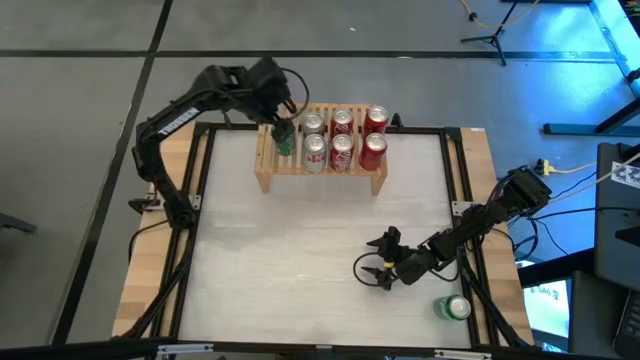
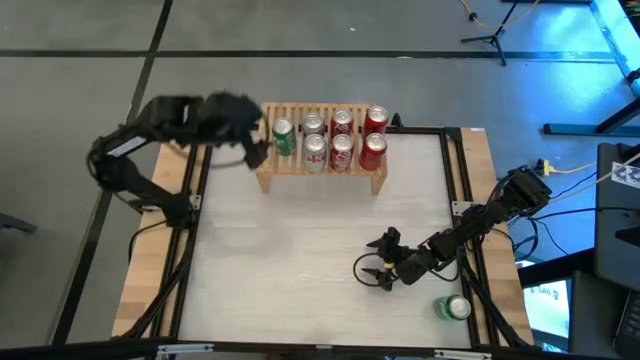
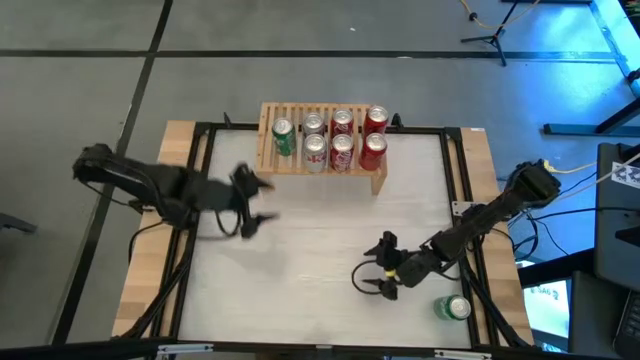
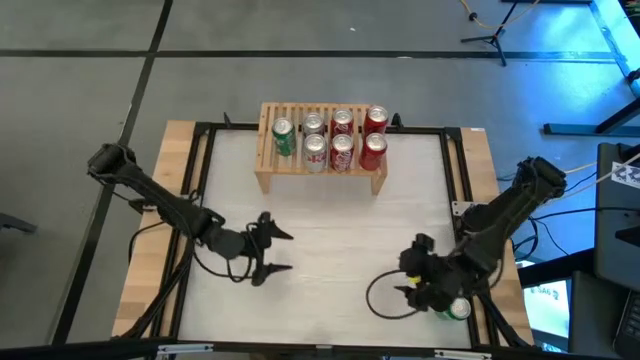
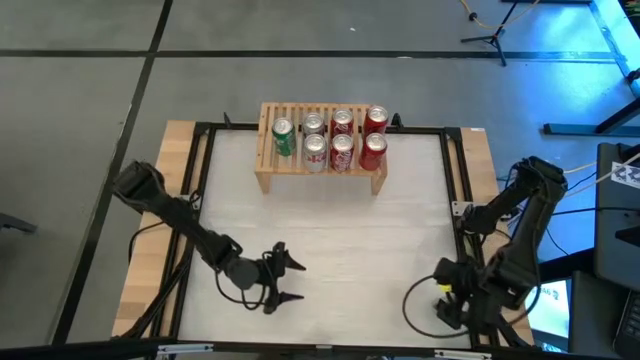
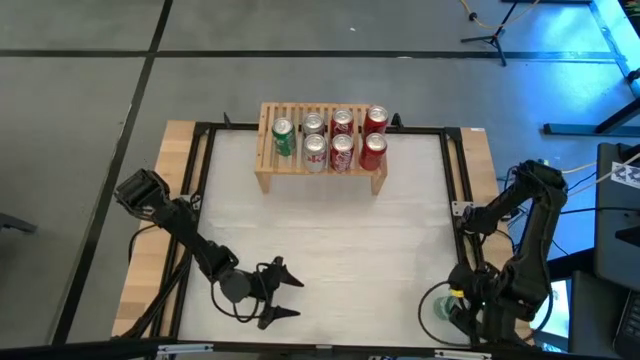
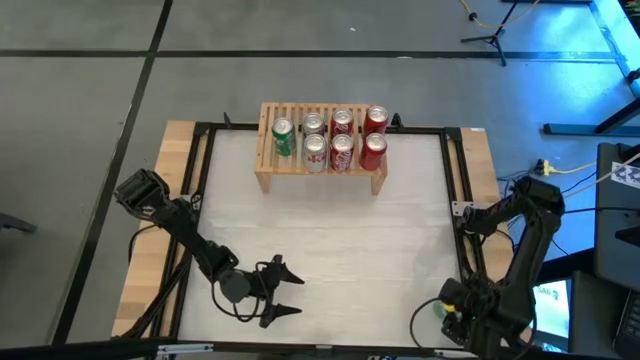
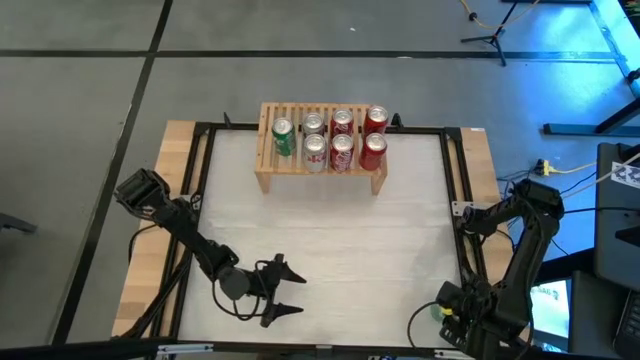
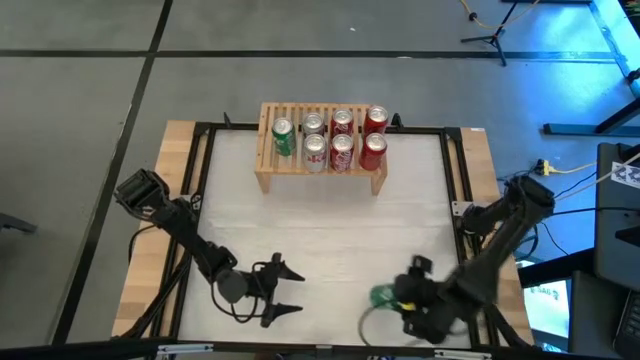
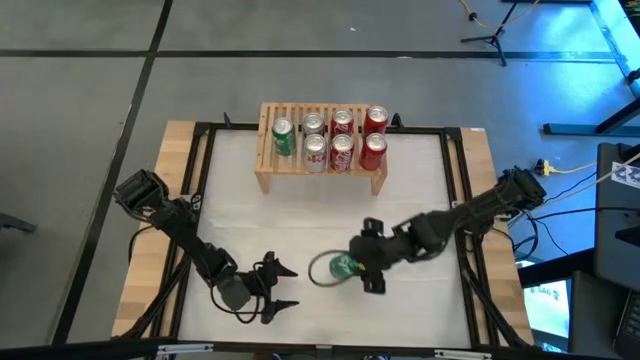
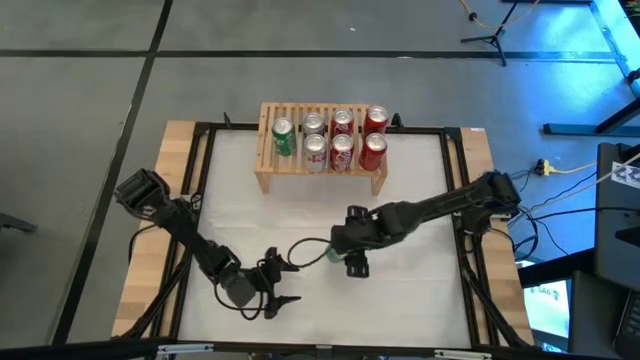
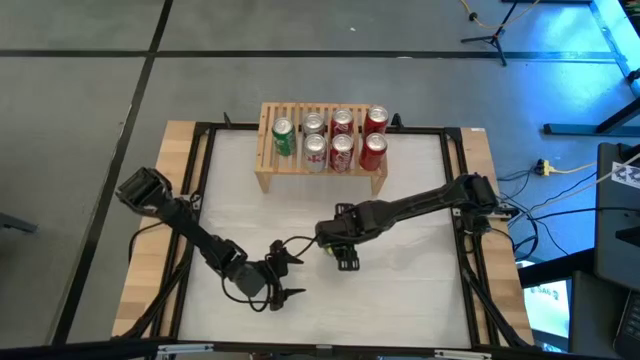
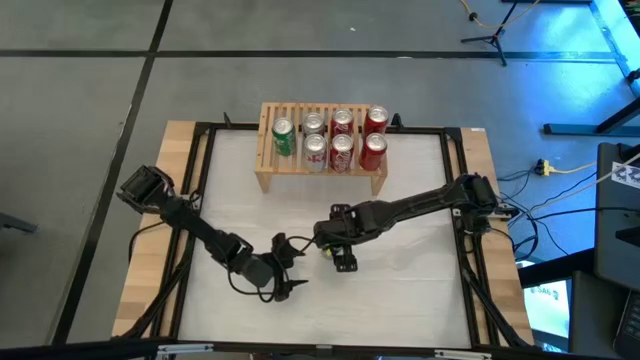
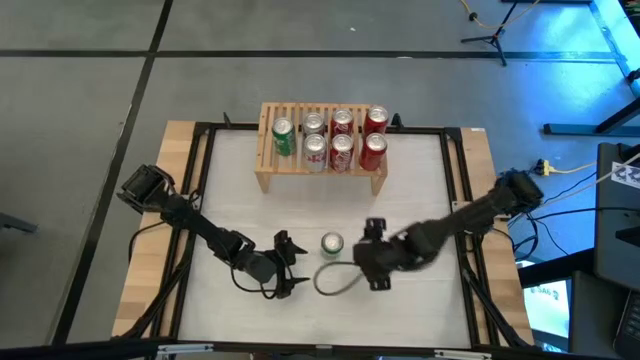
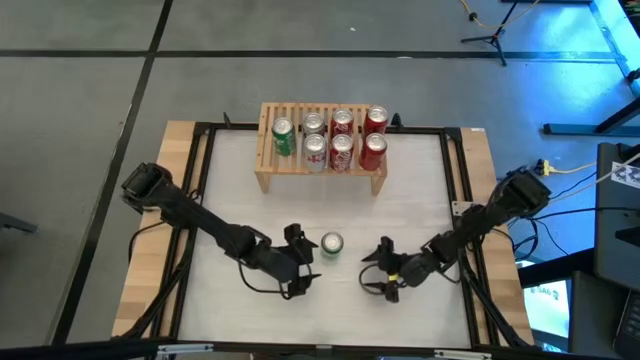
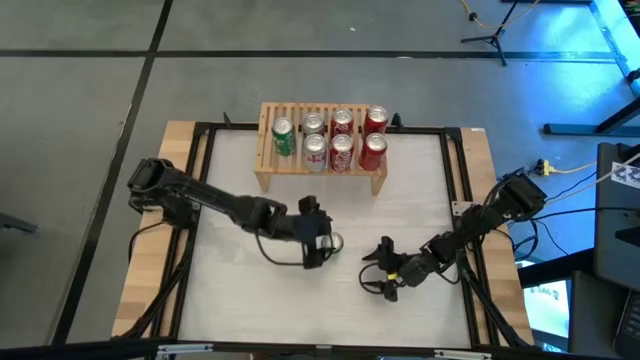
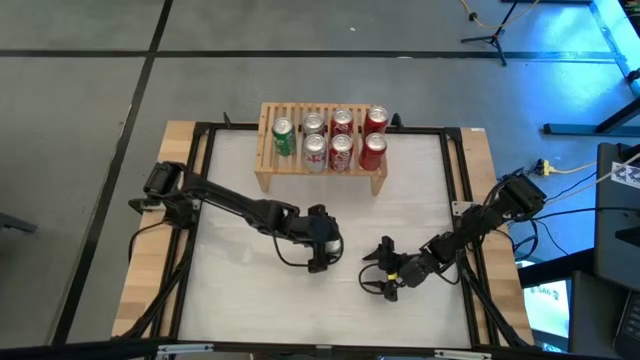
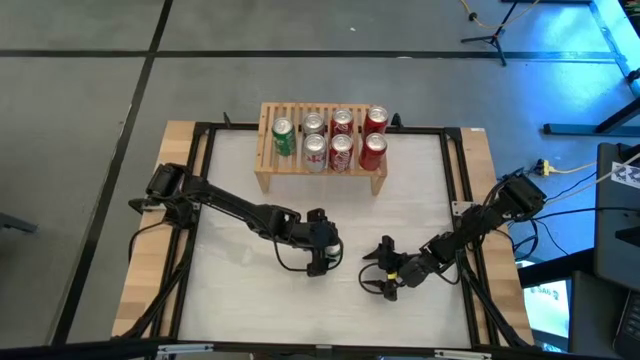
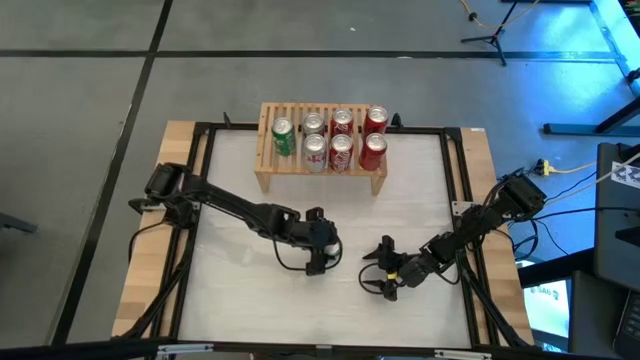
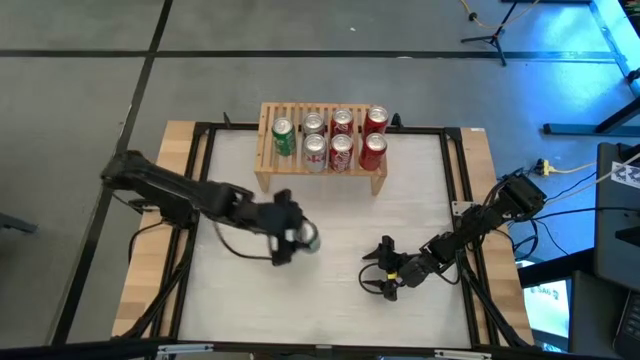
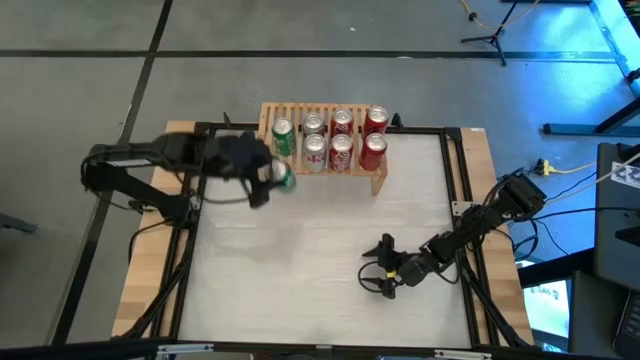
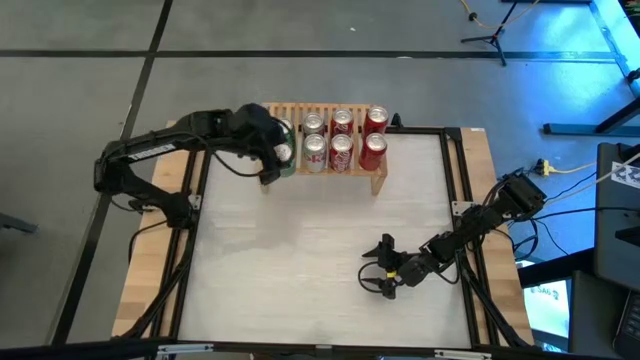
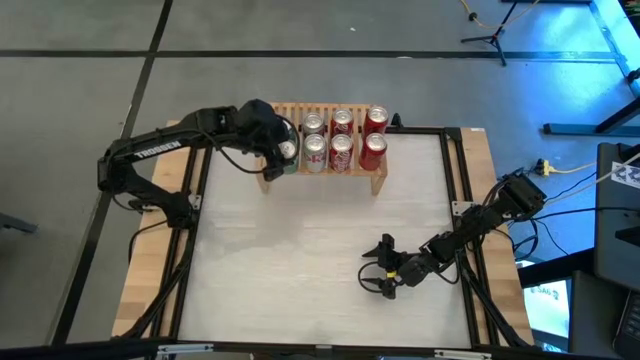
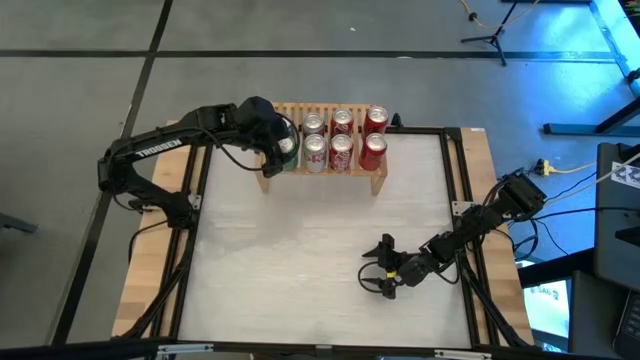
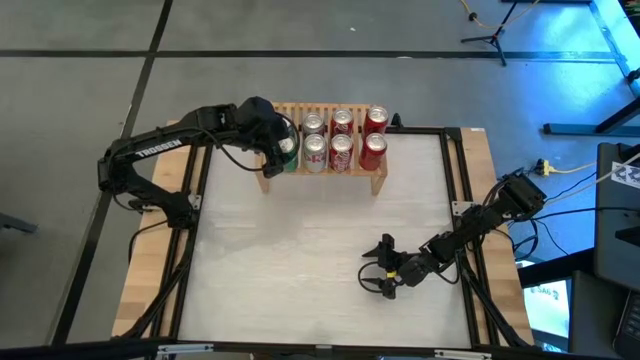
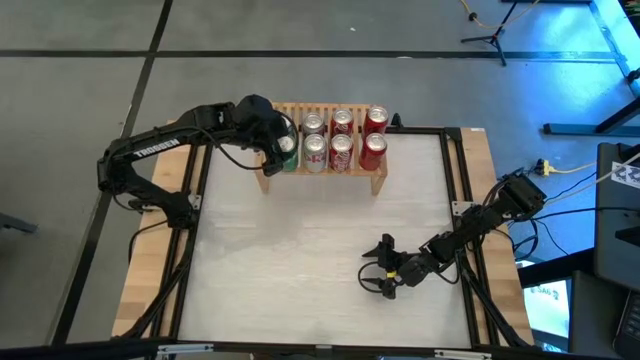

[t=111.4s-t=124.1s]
Task: Place canned beverage on shelf
Put the green soda can on the shelf

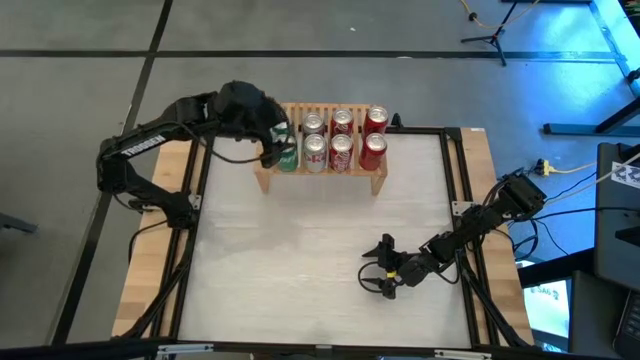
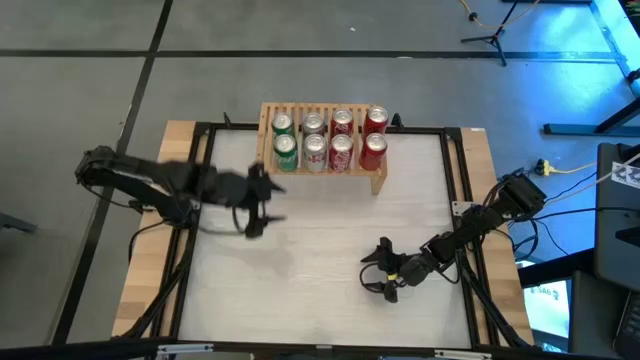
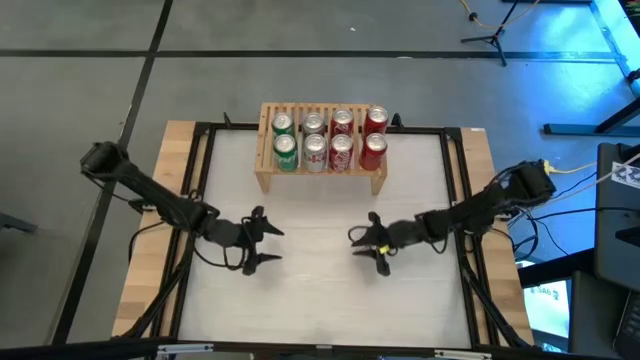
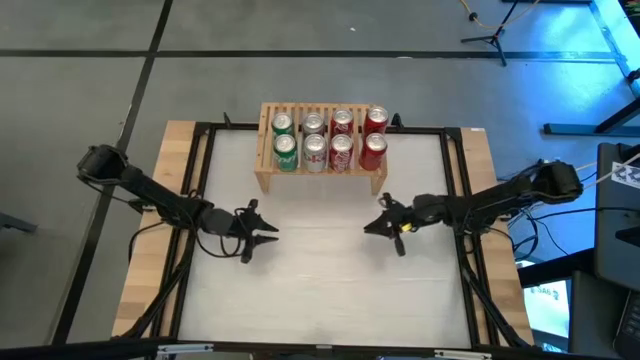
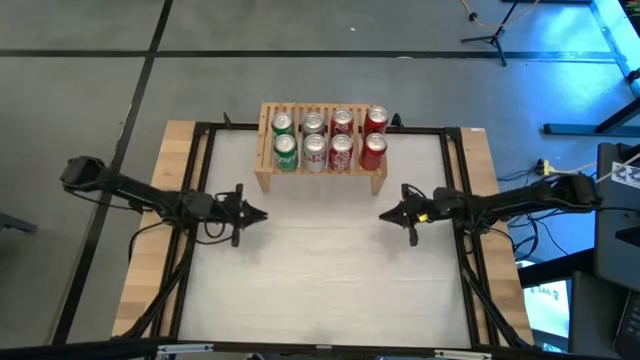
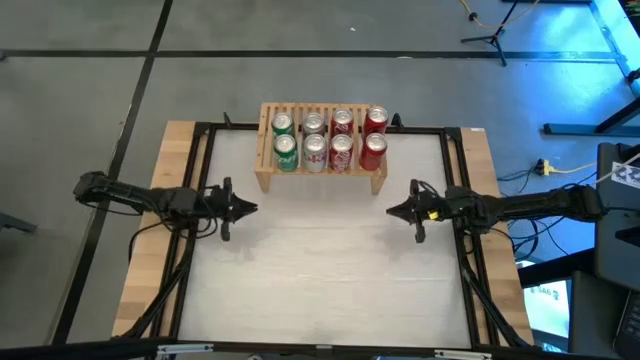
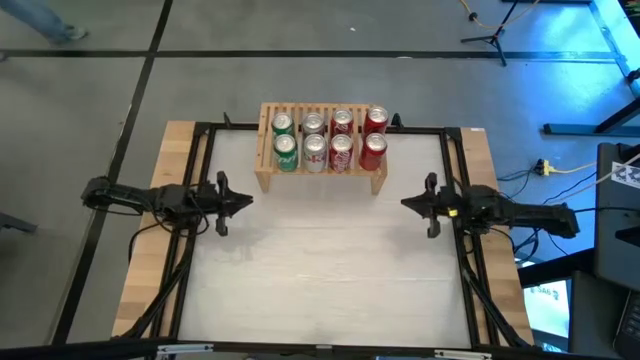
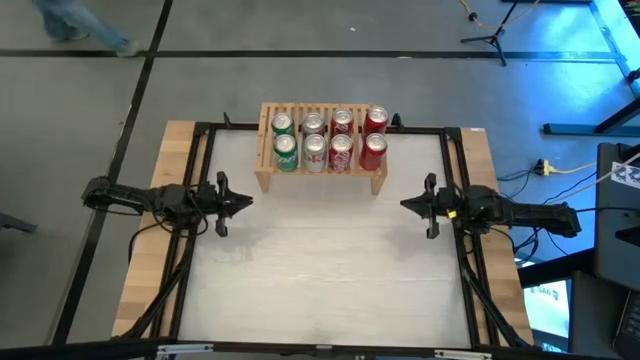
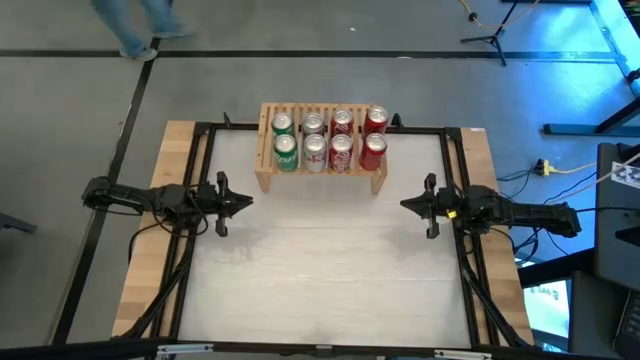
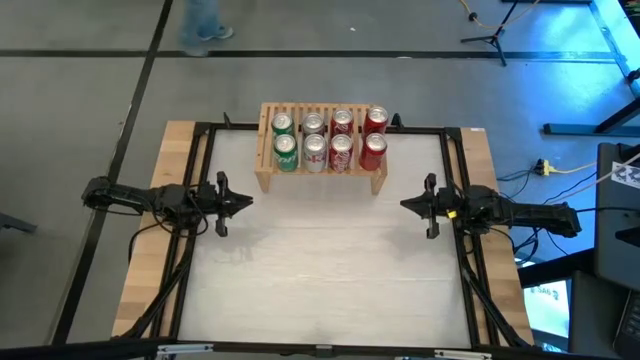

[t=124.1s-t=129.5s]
Return to Home Position

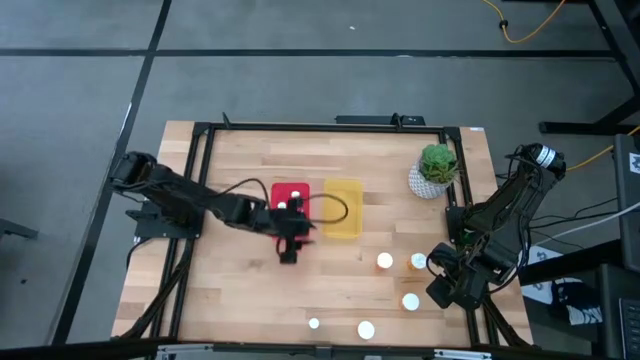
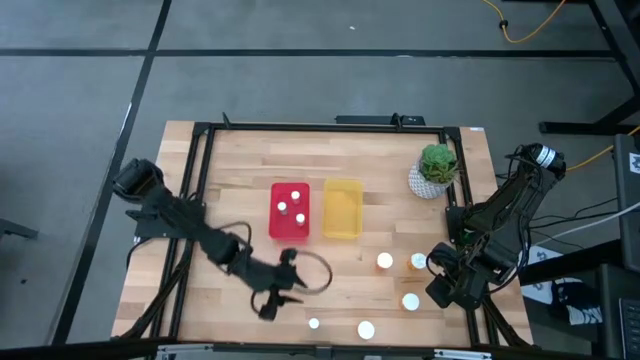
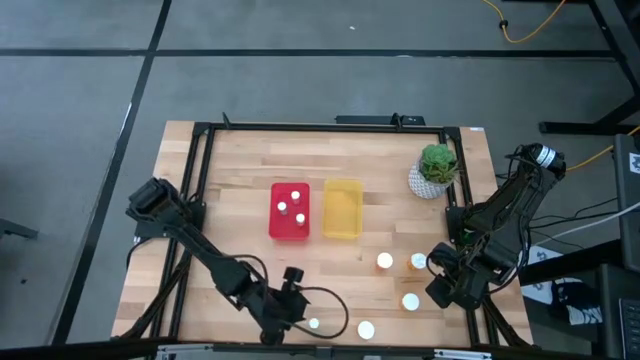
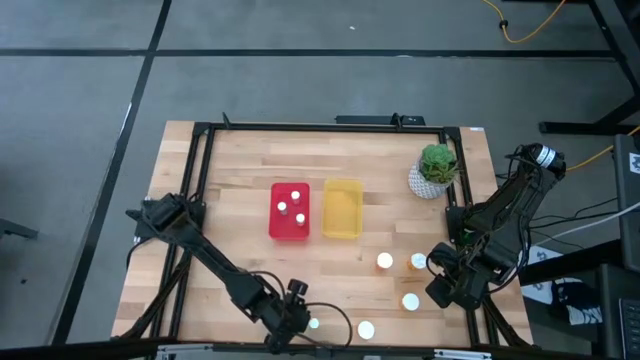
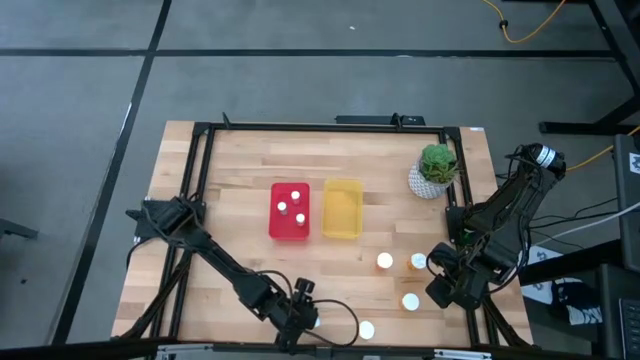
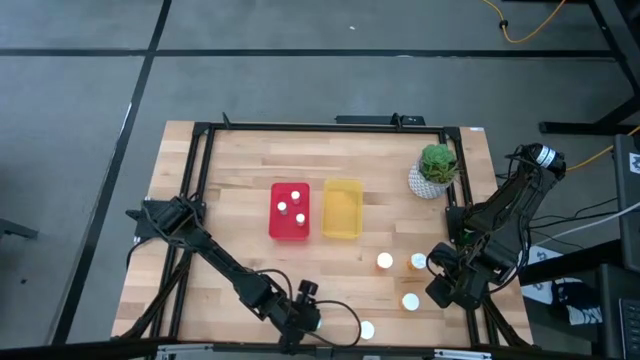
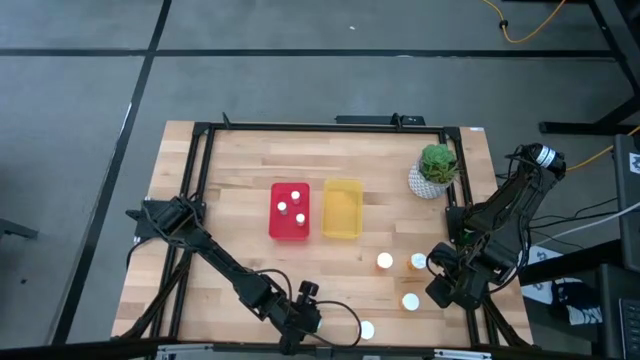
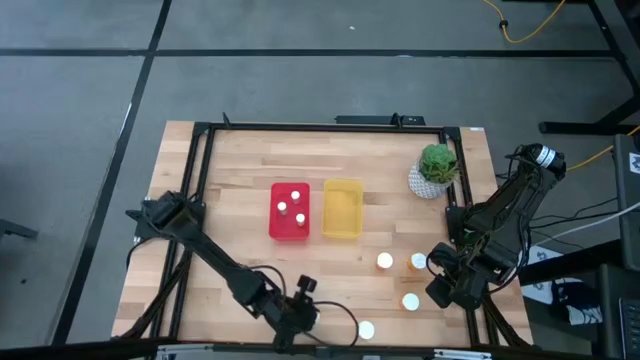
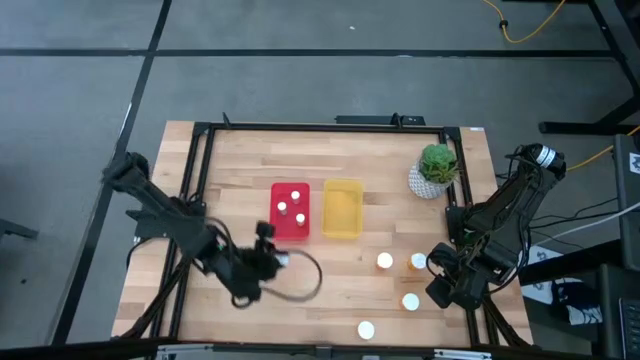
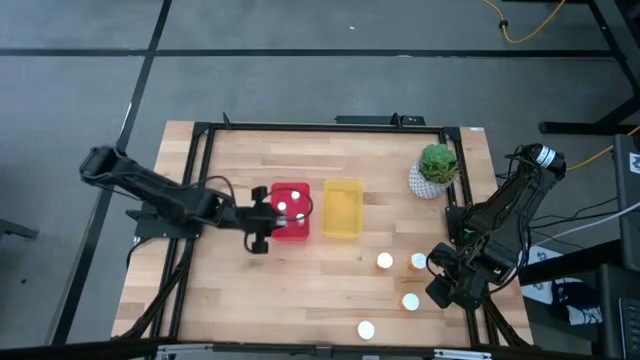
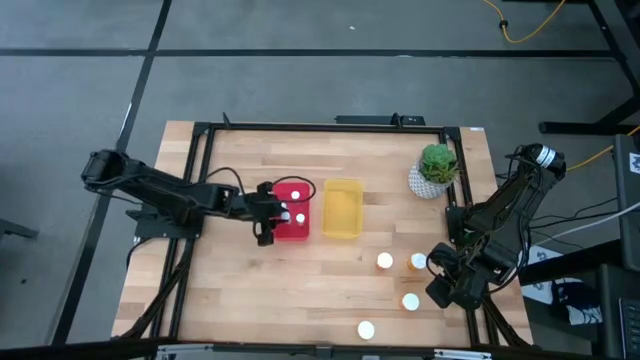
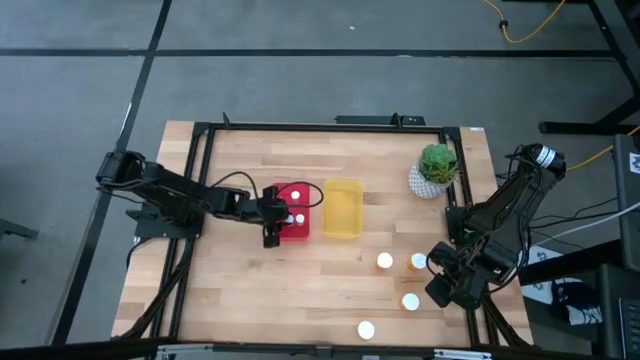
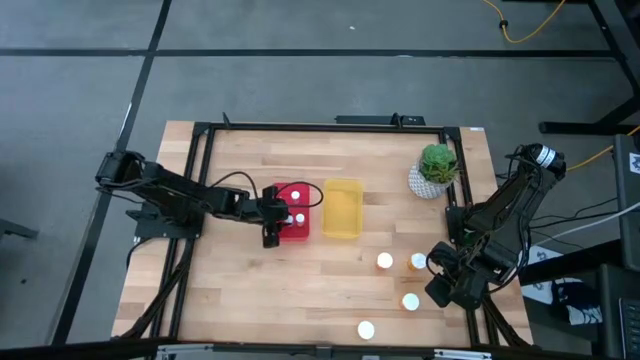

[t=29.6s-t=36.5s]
Task: Pick and place medicine bottles into bin by pill shape (circle, oval)
Put the small green pill bottle into the red bin
